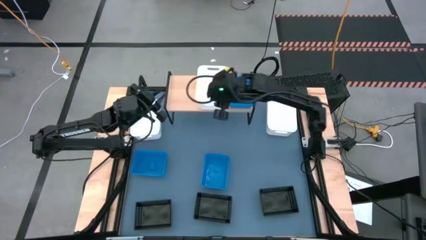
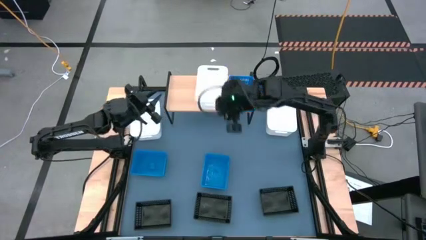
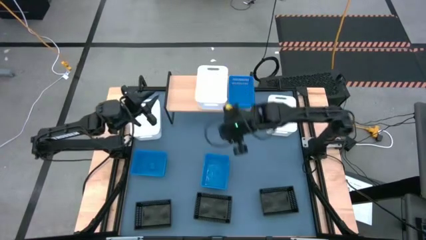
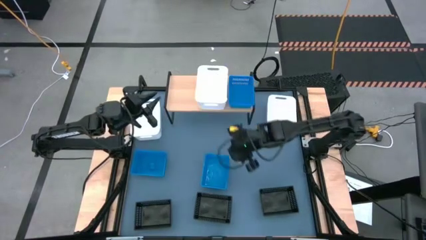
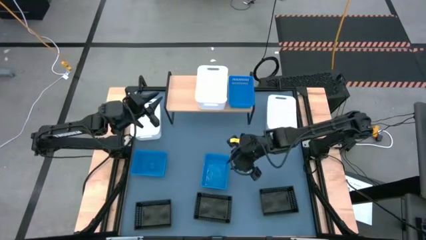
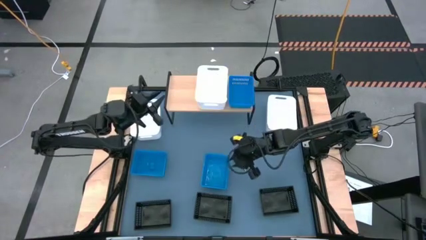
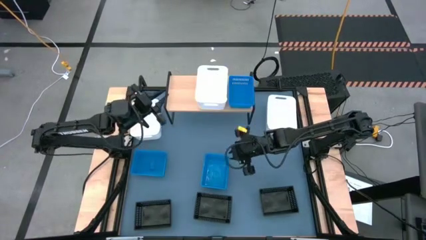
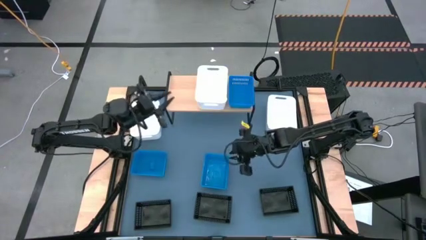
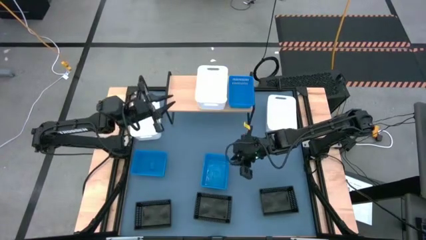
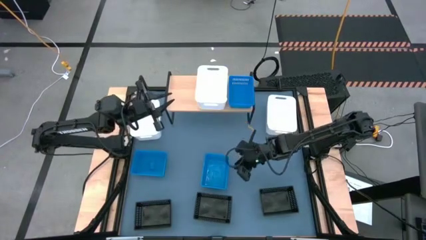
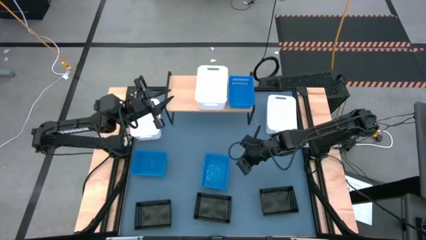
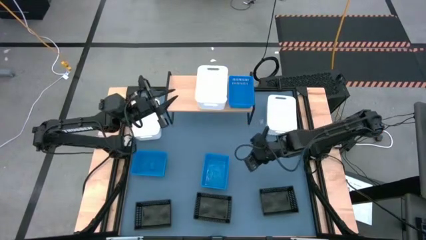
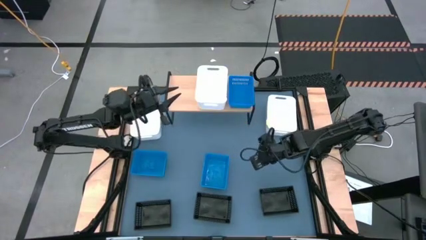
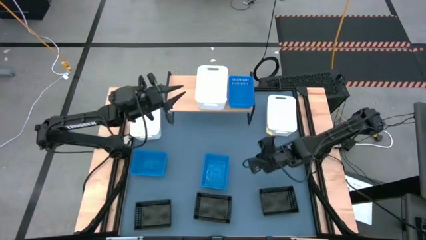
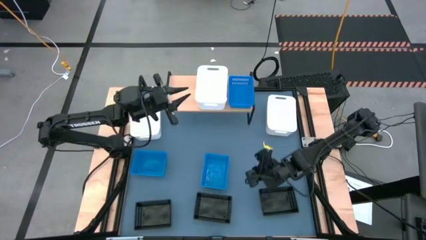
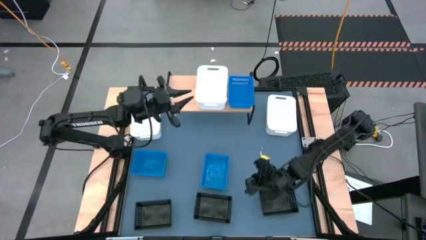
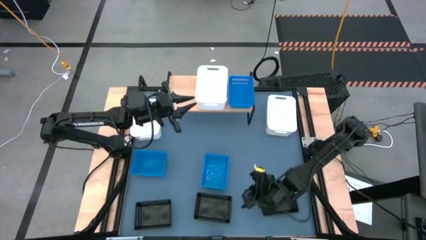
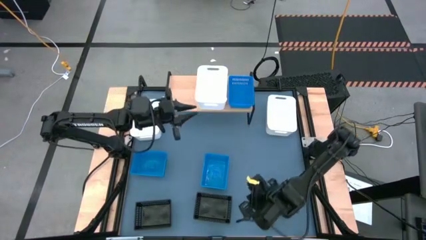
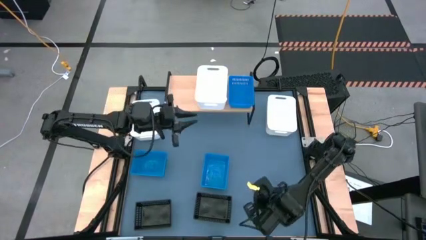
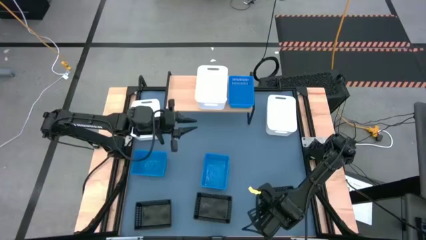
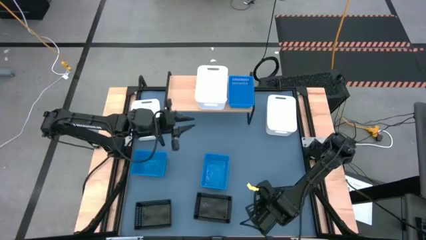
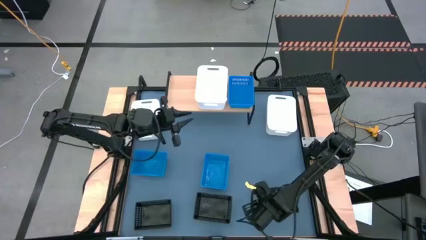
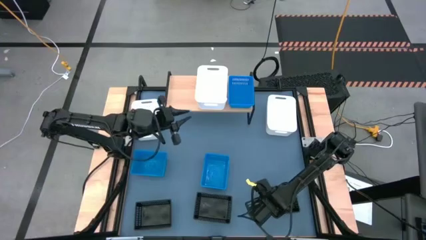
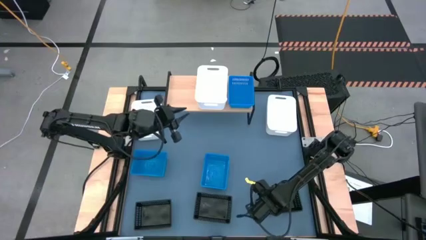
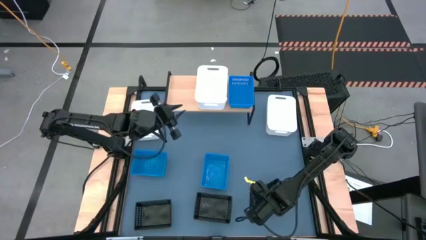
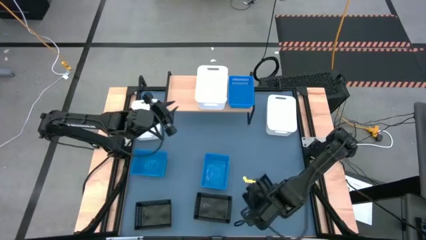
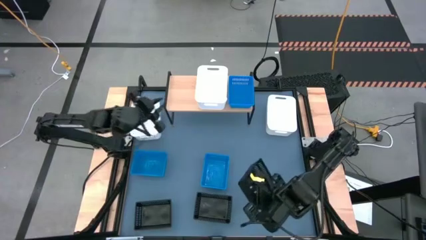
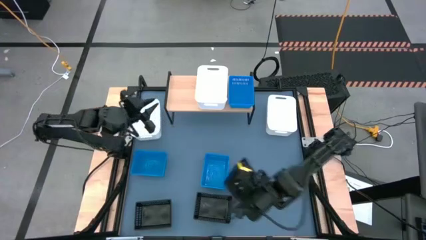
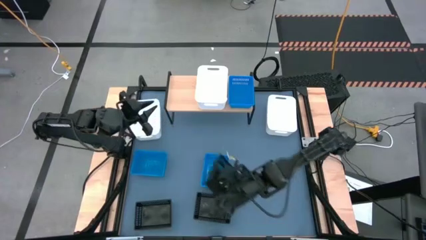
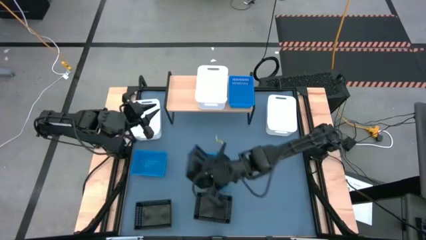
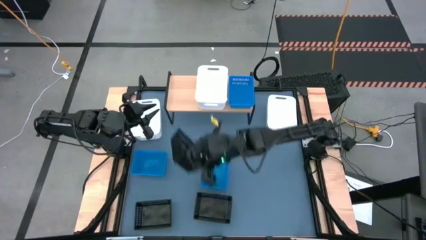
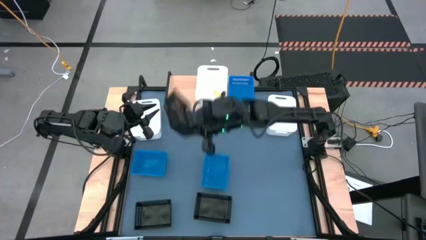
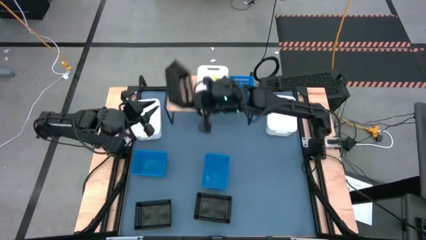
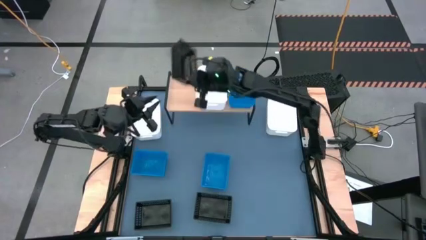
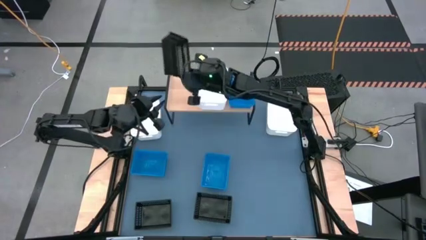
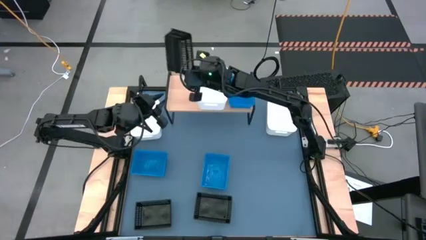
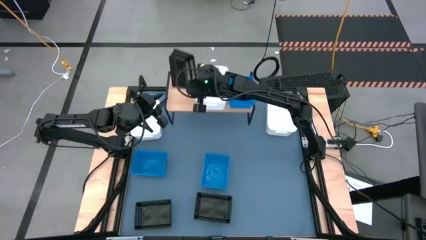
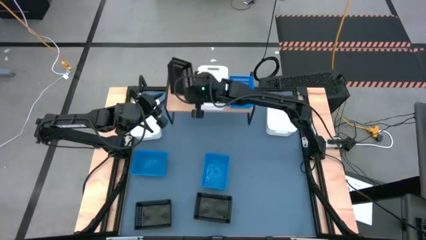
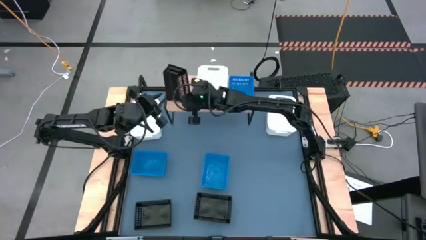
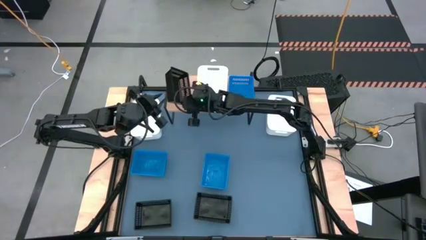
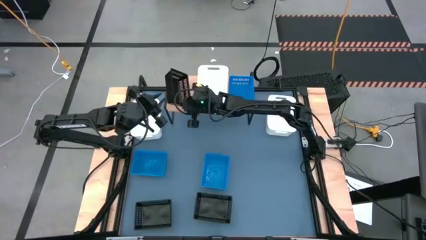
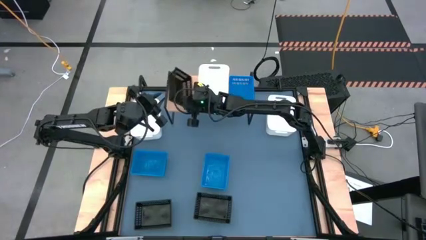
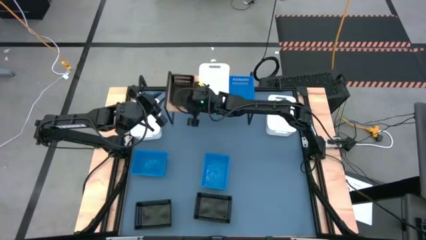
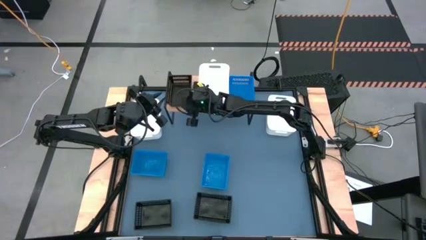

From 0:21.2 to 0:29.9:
Task: Stack baskets on shelf by color
Put the right black bin on the shelf

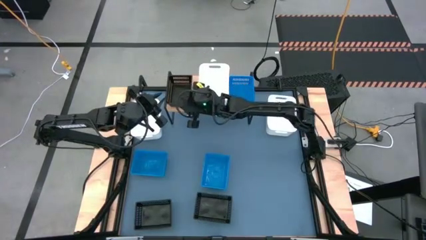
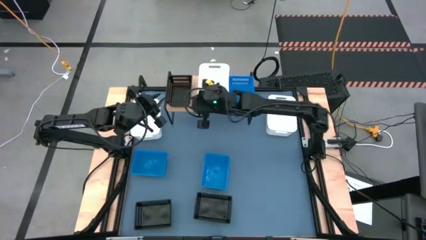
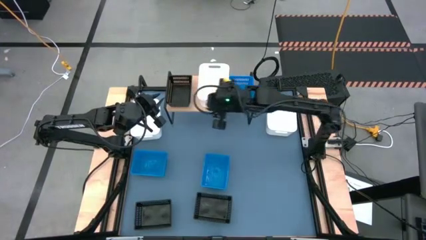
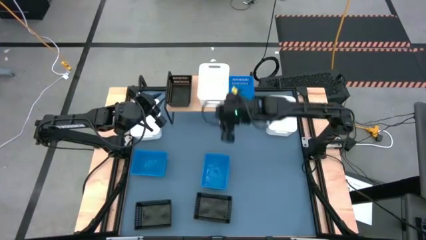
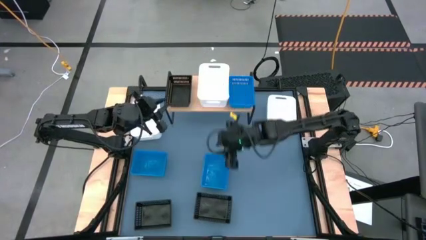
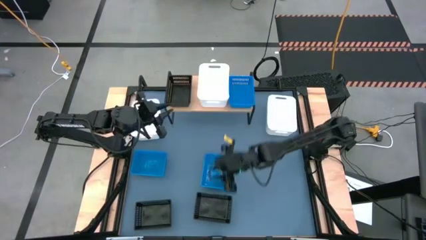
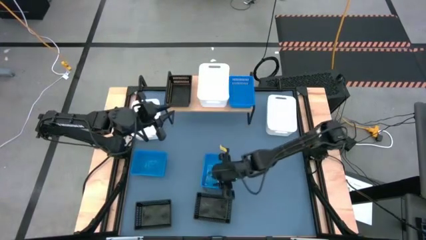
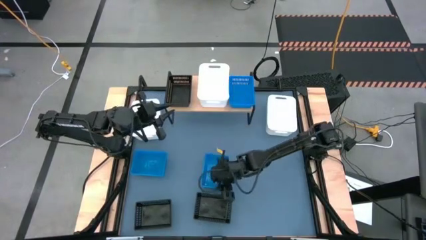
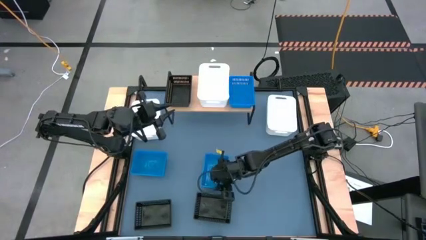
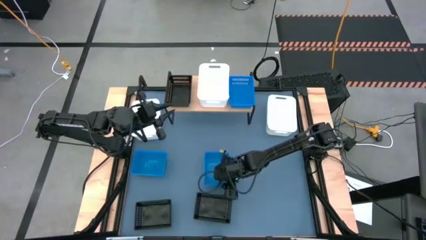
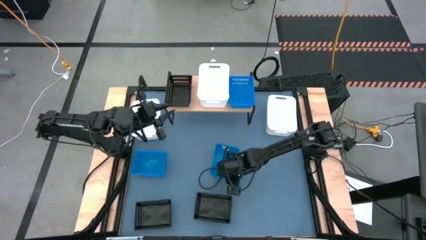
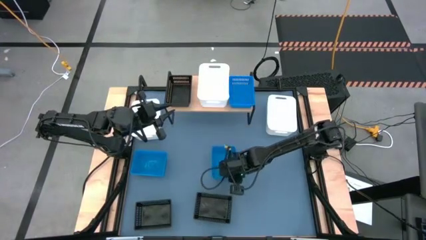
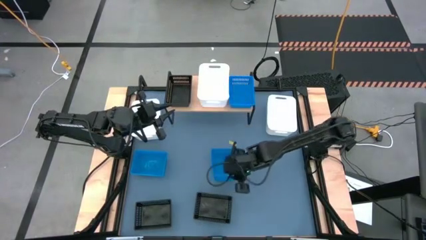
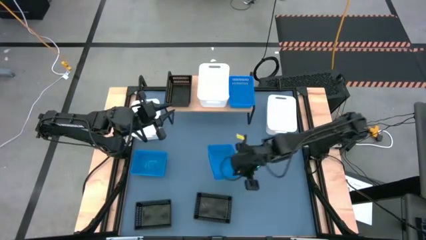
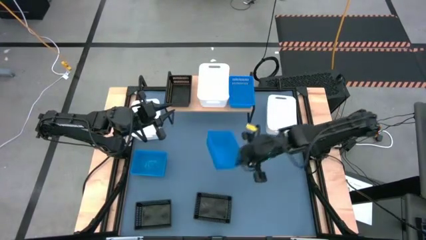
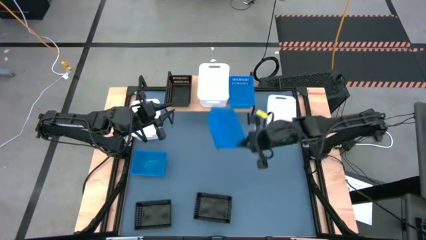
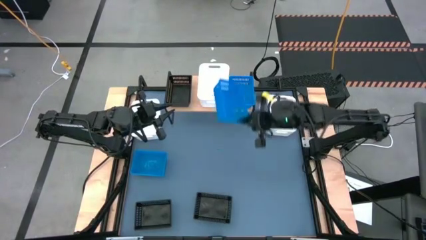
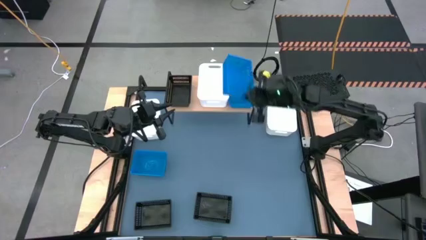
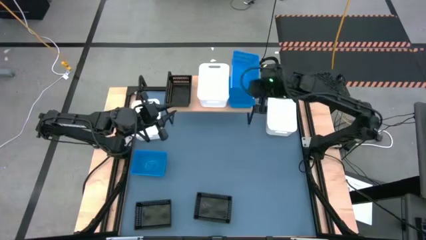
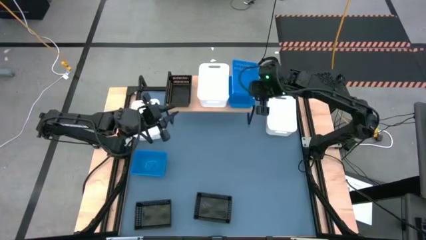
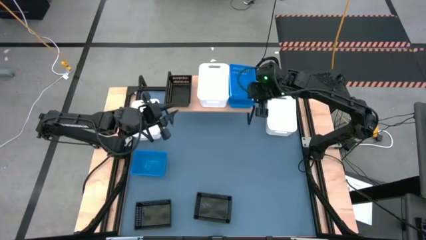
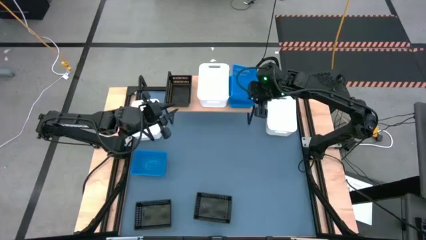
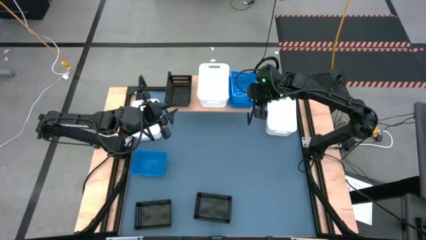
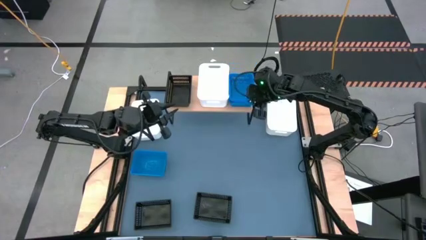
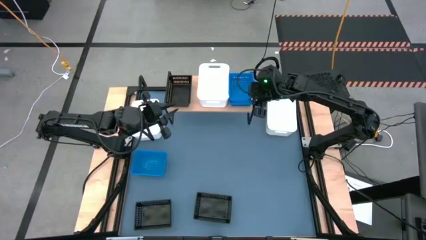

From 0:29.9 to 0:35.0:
Stack the right blue bin on top of the other blue bin on the shelf

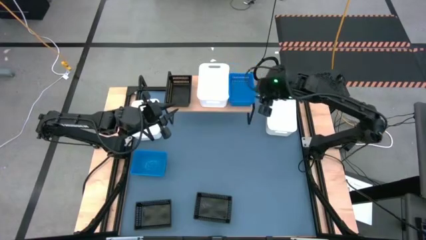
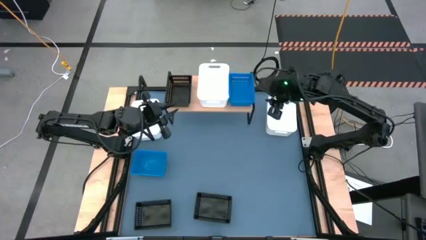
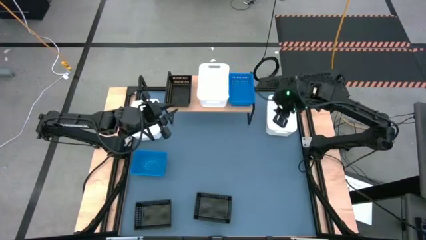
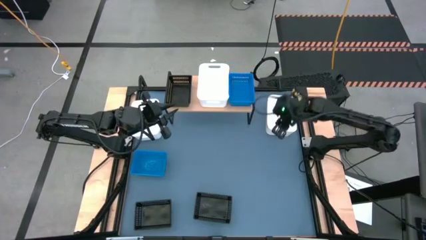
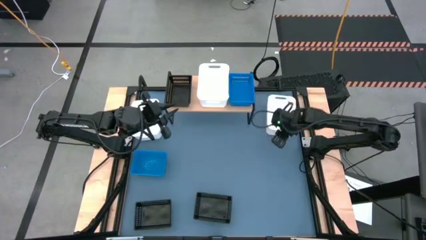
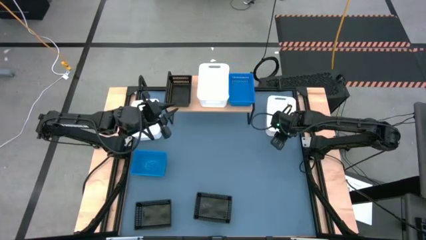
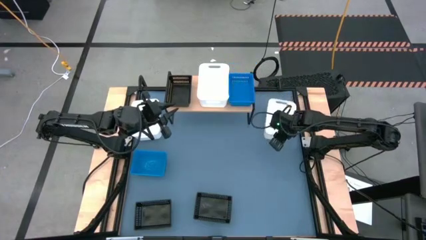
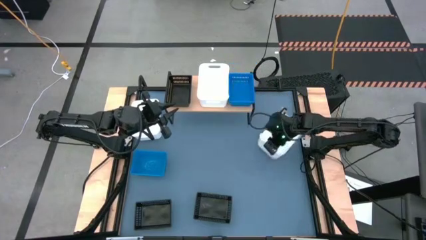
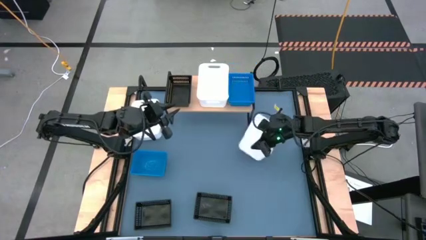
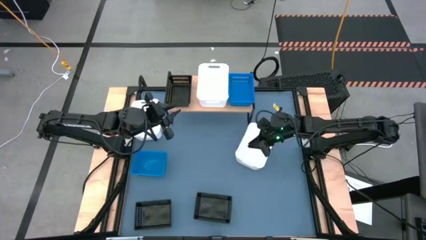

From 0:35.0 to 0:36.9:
Stack the right white bin on top of the other white bin on the shelf
